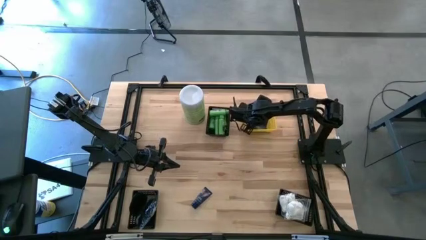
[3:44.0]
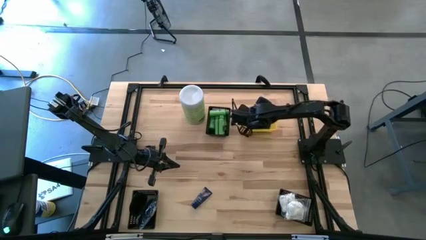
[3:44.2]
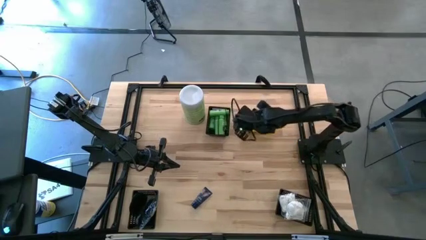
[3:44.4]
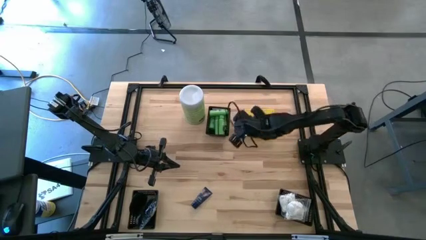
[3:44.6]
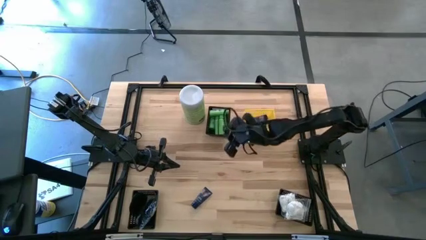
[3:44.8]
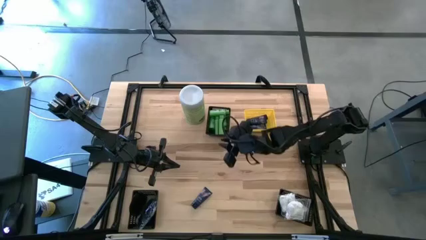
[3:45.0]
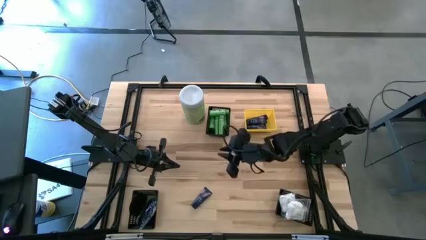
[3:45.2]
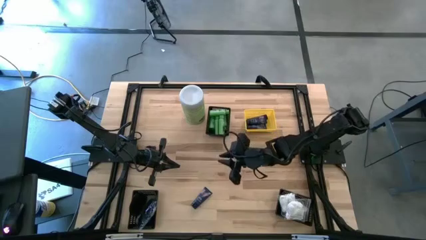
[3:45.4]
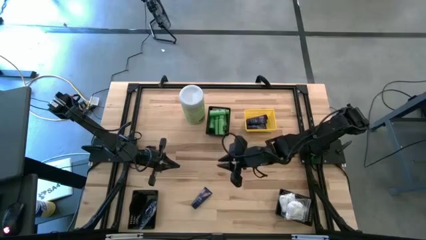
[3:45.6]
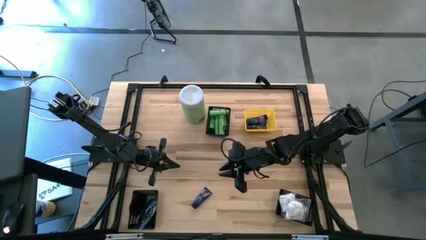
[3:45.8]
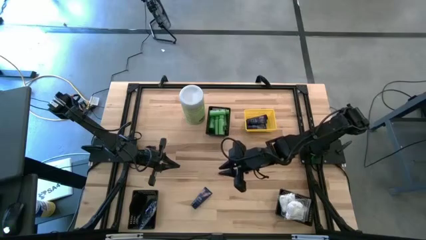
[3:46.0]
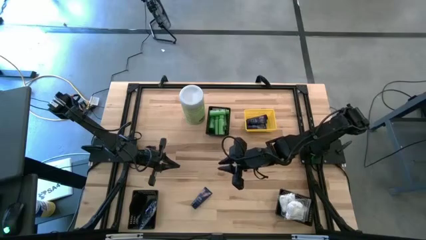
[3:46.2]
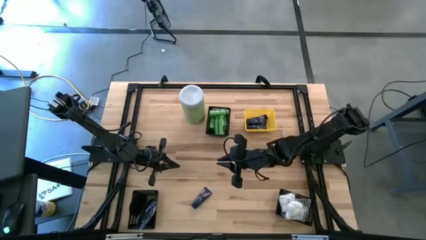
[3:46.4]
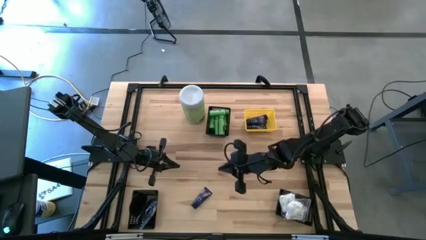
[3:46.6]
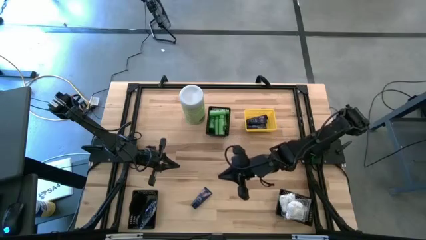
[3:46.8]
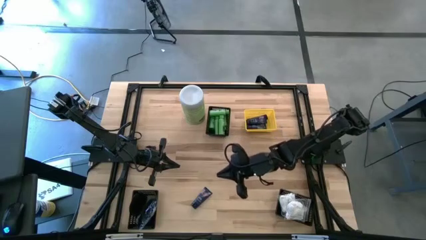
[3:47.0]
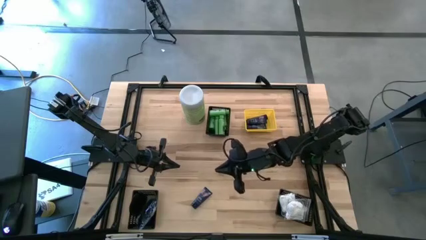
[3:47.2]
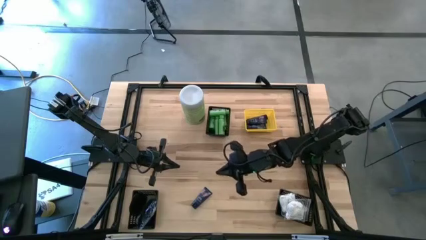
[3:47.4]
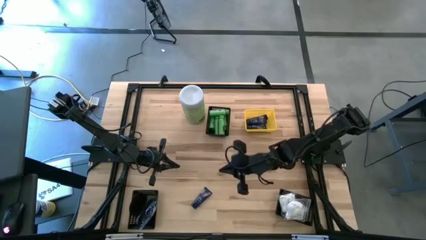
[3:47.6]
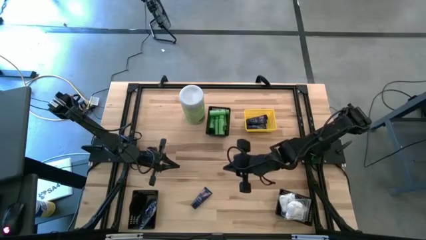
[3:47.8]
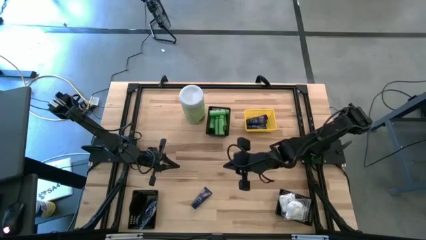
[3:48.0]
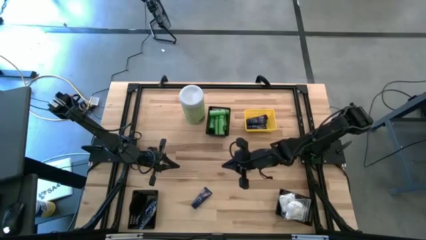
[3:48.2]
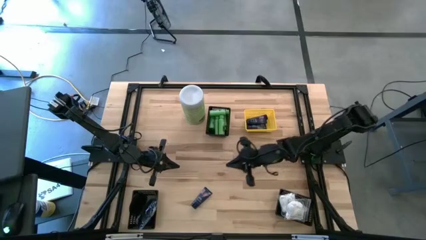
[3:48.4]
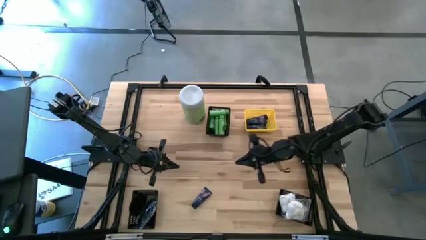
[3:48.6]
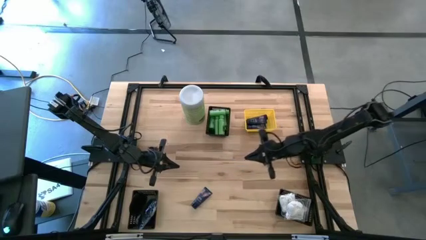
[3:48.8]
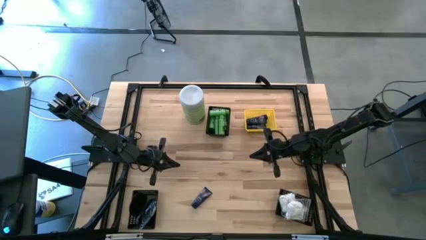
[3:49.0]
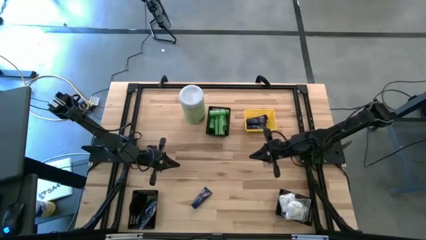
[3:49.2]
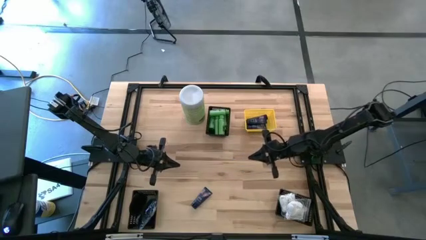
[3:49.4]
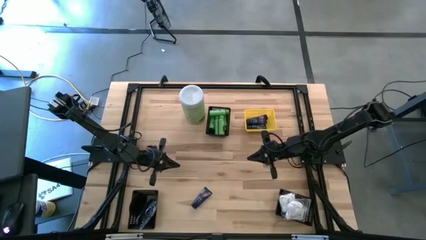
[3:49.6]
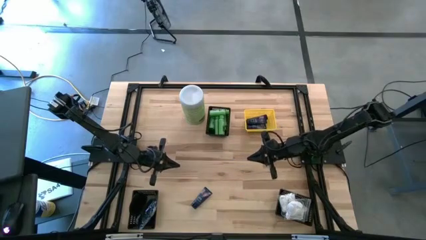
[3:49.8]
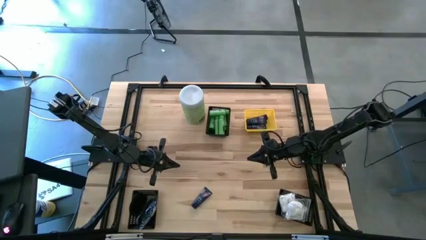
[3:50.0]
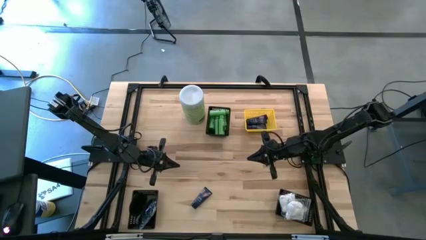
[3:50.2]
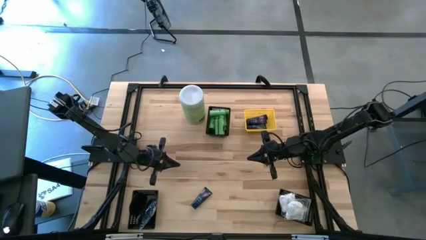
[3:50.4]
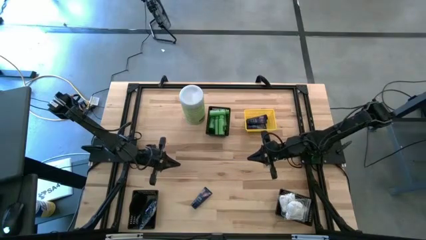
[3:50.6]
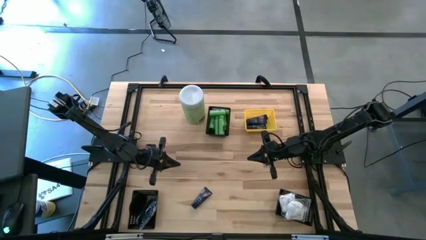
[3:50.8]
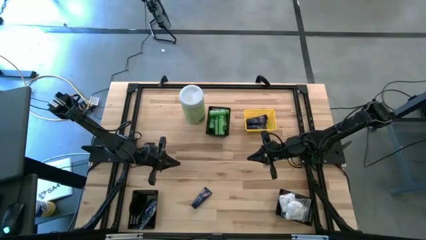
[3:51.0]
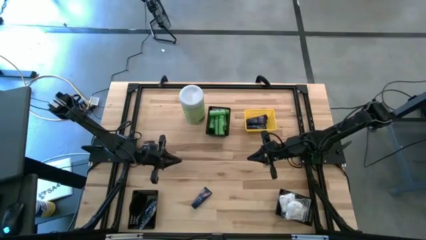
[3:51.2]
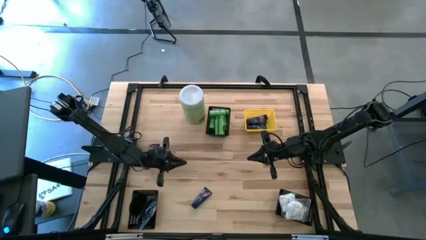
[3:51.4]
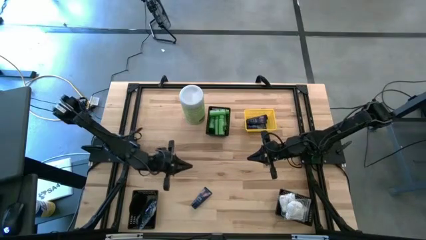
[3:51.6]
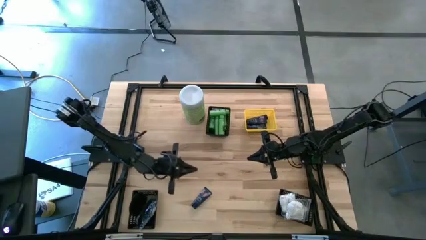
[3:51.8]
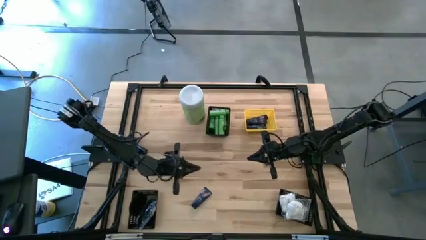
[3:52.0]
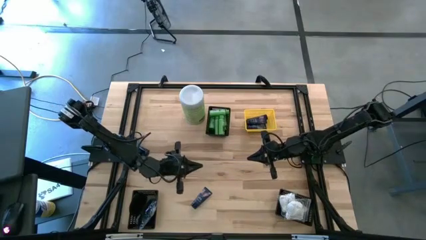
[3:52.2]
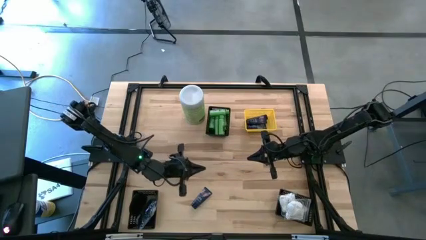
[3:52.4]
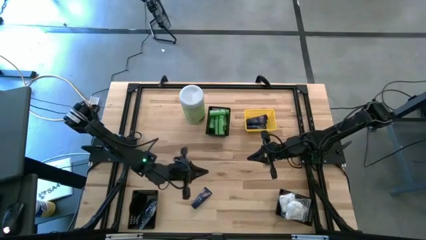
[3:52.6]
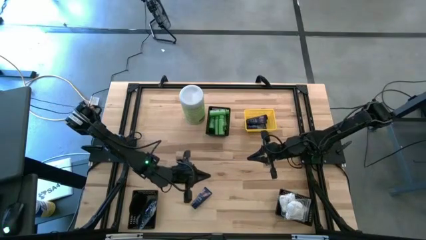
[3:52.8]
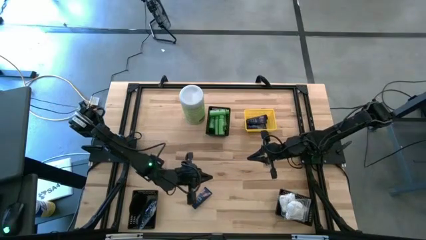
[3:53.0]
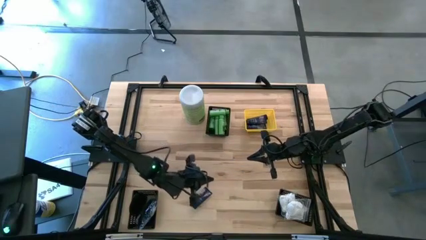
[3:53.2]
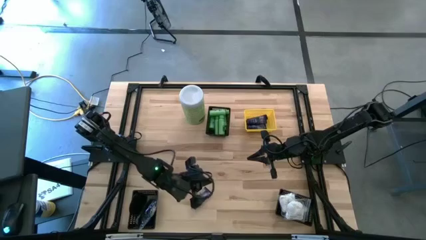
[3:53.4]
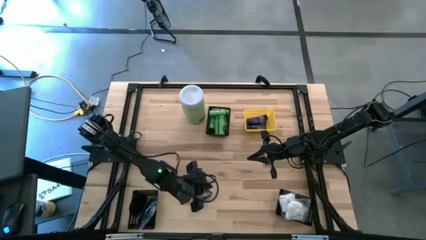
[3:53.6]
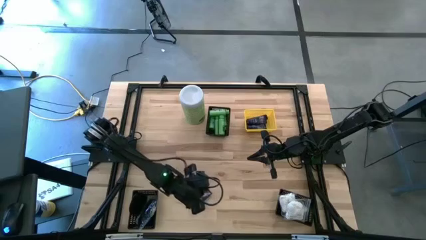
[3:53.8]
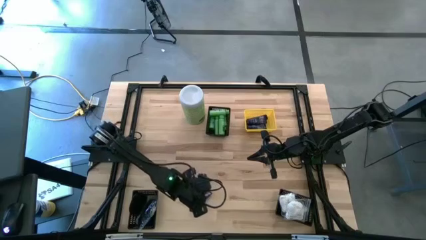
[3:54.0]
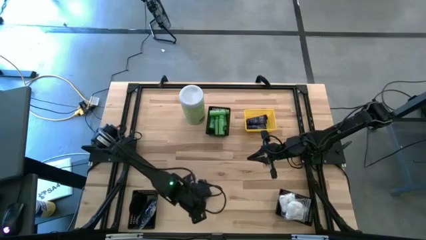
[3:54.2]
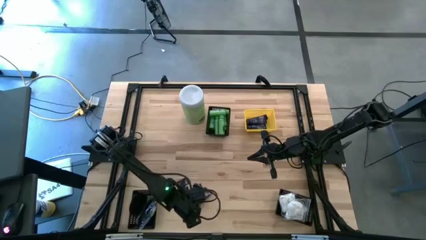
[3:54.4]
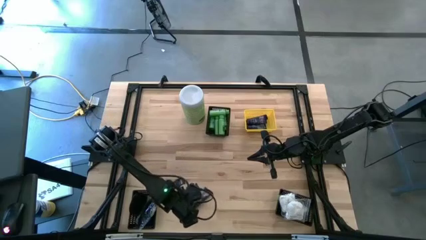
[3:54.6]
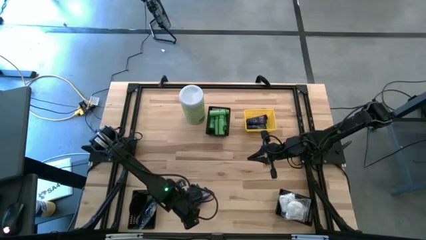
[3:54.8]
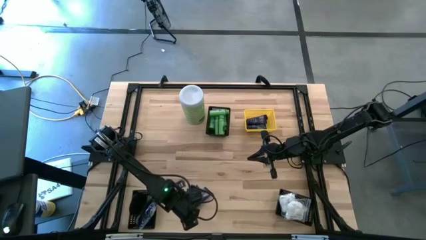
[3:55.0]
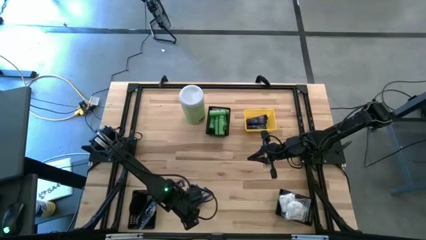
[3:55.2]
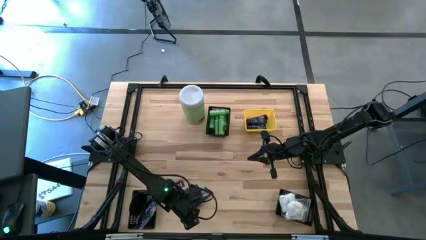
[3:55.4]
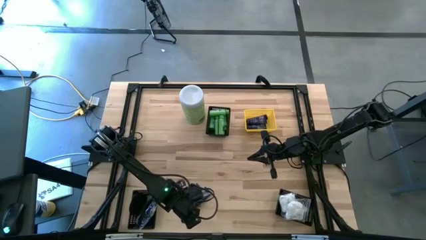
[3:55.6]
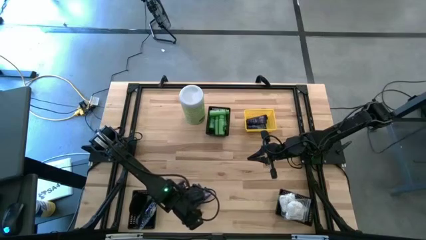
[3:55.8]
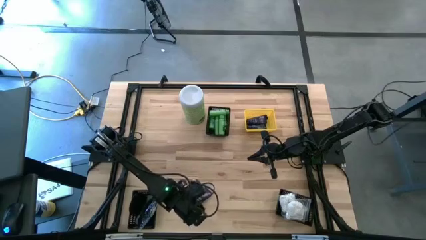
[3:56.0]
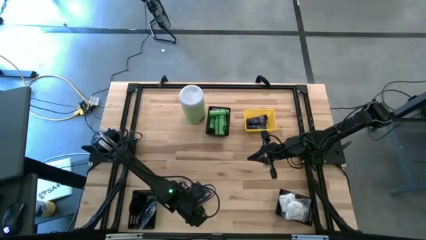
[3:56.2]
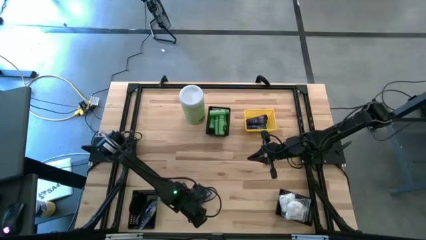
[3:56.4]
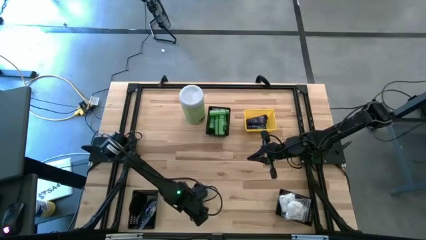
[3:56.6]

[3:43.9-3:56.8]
Task: Pick & Place Travel size toiletries
Put the blue shave butter into the yellow bin
